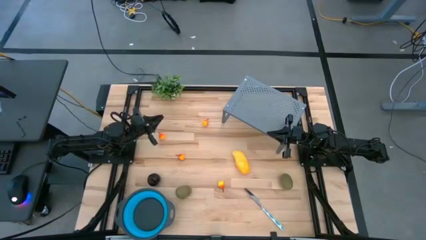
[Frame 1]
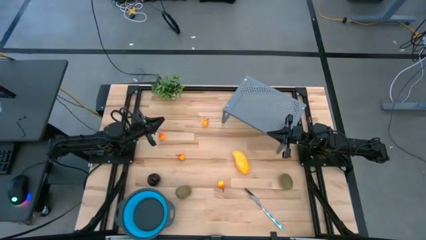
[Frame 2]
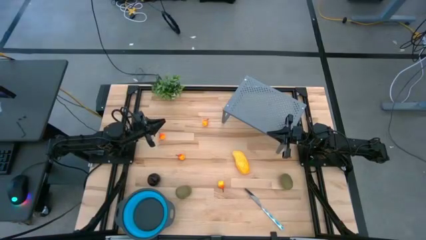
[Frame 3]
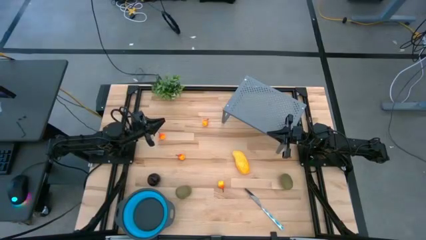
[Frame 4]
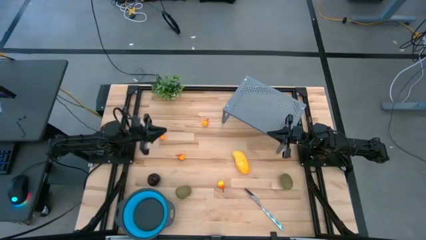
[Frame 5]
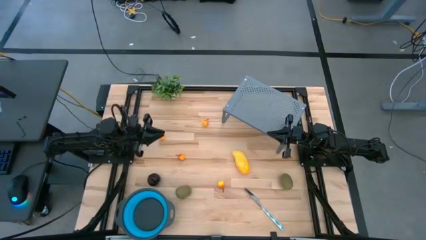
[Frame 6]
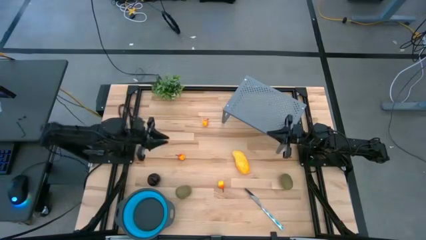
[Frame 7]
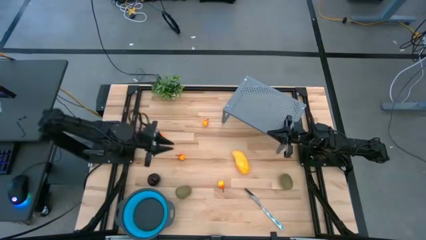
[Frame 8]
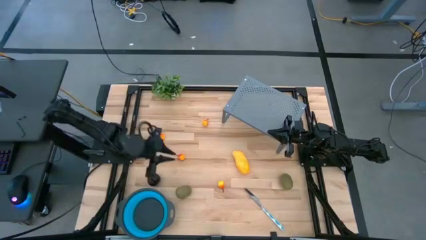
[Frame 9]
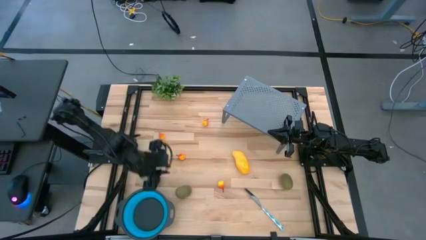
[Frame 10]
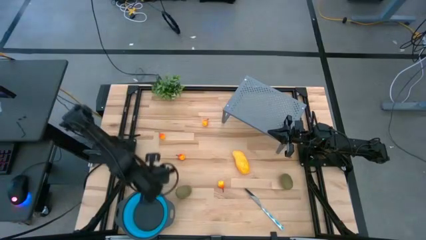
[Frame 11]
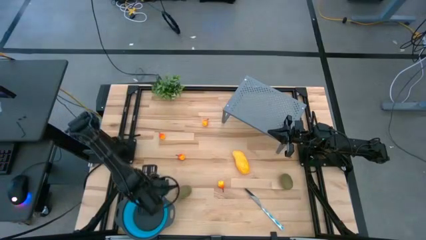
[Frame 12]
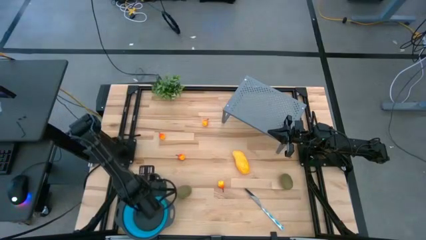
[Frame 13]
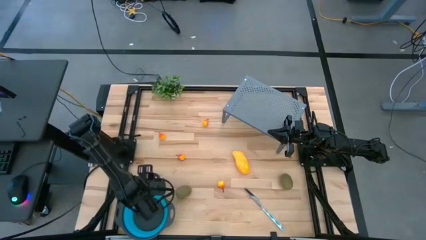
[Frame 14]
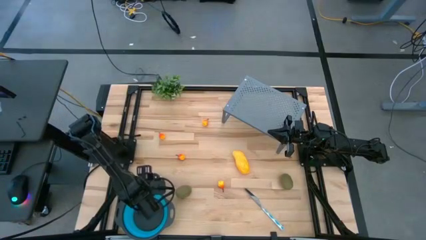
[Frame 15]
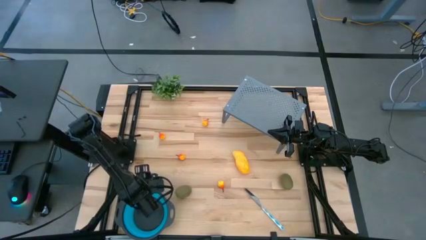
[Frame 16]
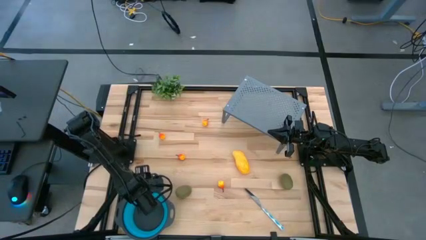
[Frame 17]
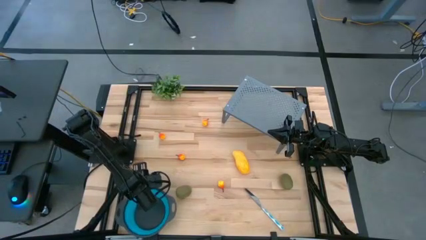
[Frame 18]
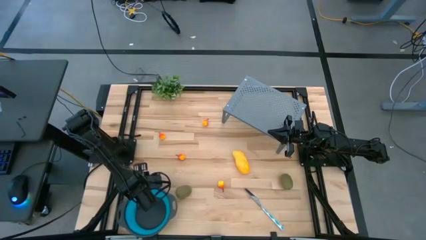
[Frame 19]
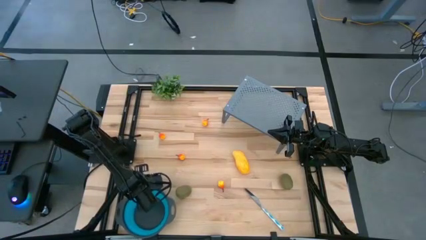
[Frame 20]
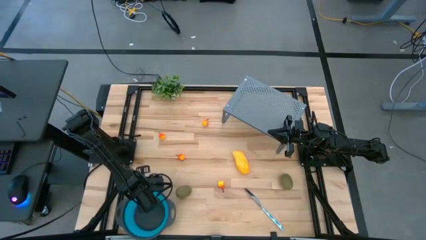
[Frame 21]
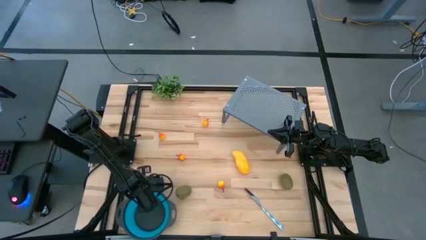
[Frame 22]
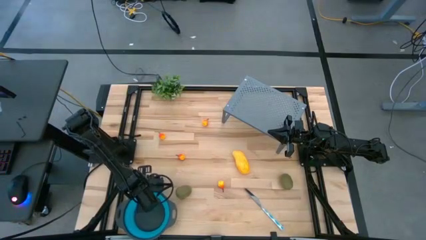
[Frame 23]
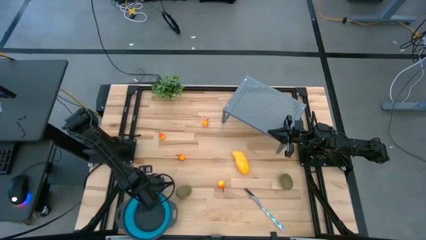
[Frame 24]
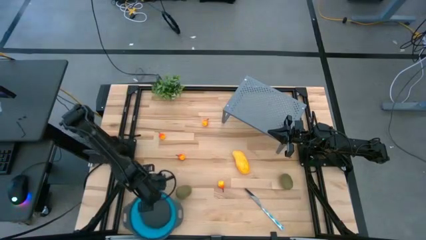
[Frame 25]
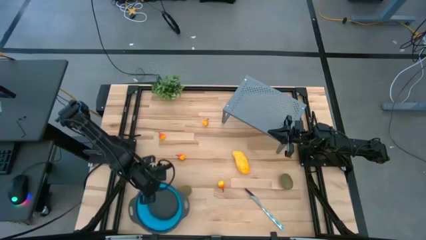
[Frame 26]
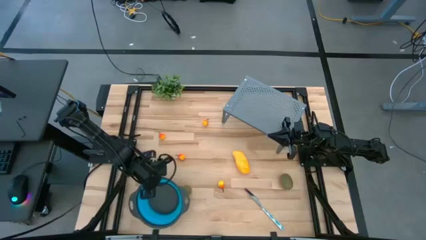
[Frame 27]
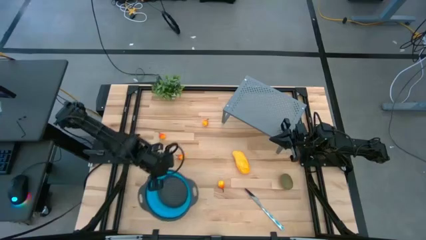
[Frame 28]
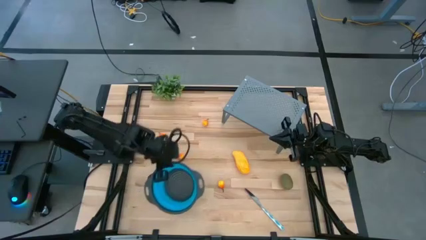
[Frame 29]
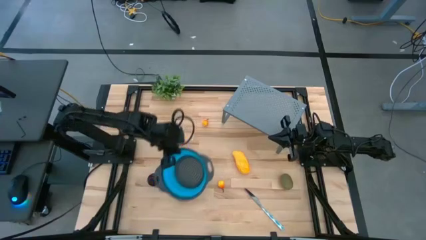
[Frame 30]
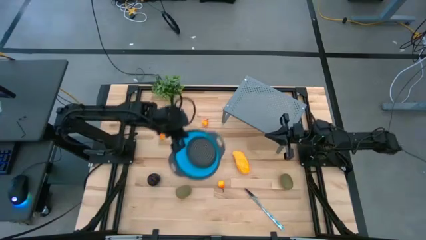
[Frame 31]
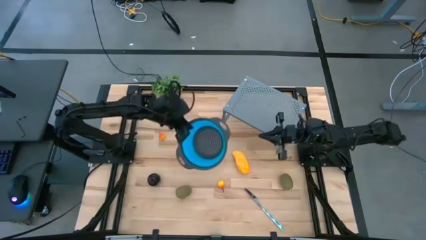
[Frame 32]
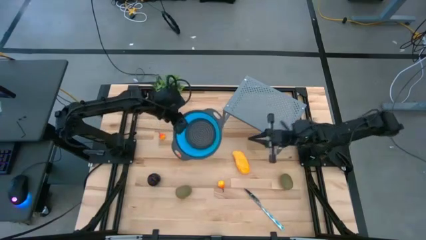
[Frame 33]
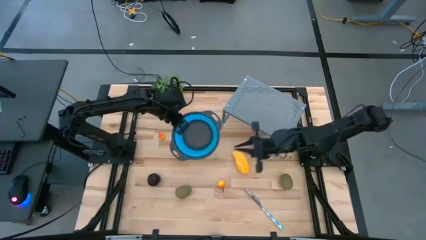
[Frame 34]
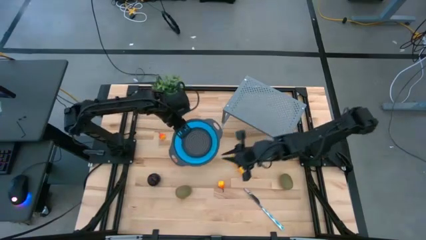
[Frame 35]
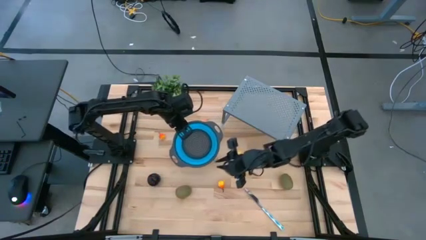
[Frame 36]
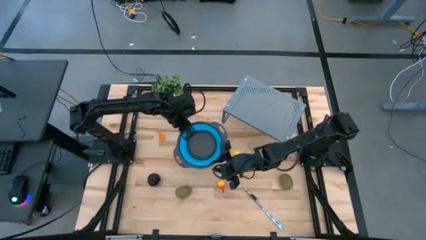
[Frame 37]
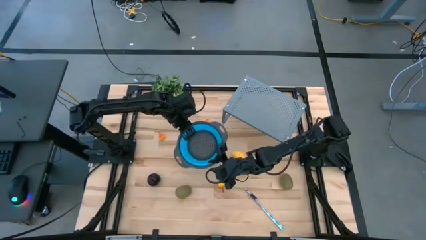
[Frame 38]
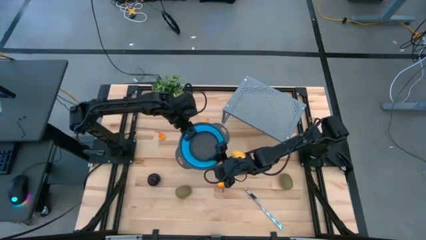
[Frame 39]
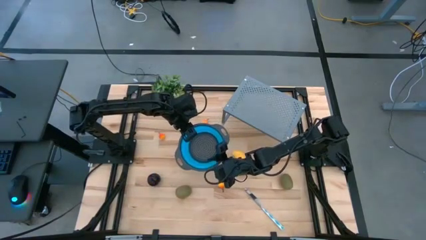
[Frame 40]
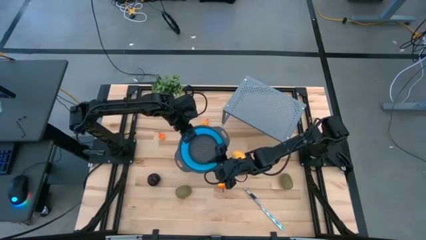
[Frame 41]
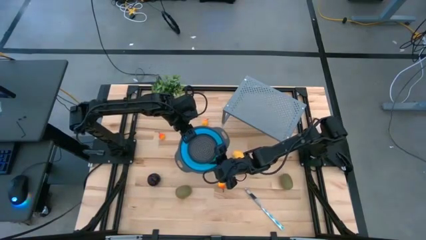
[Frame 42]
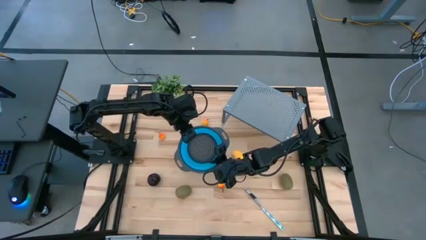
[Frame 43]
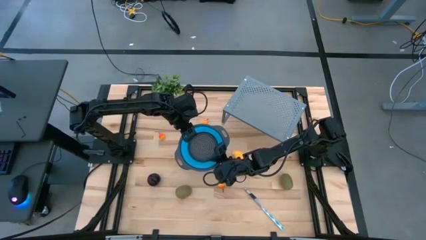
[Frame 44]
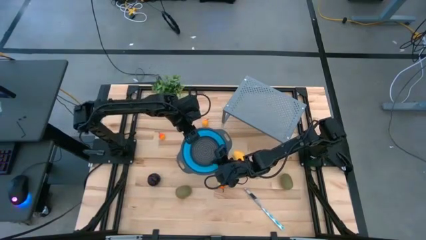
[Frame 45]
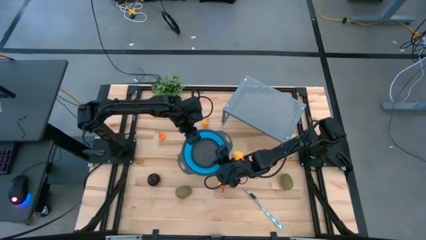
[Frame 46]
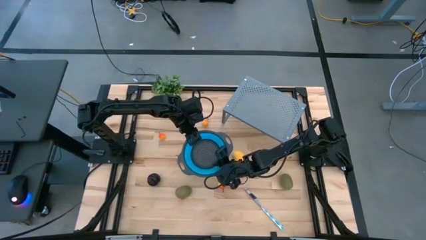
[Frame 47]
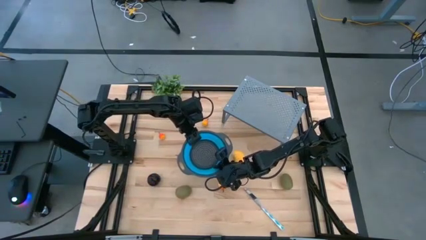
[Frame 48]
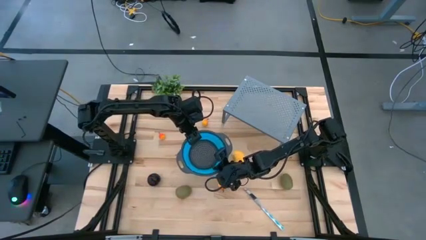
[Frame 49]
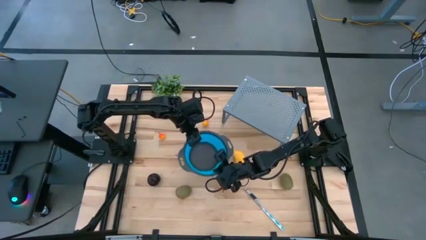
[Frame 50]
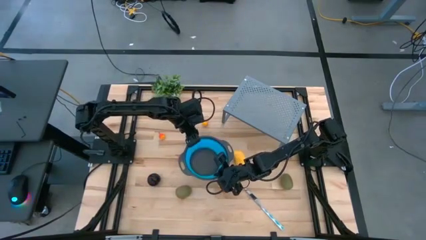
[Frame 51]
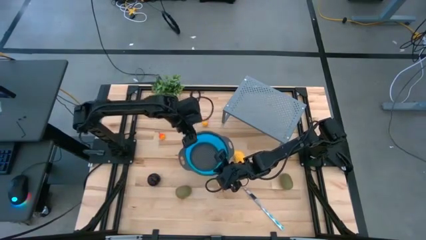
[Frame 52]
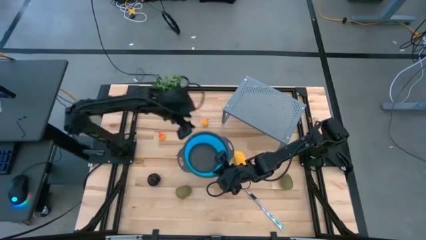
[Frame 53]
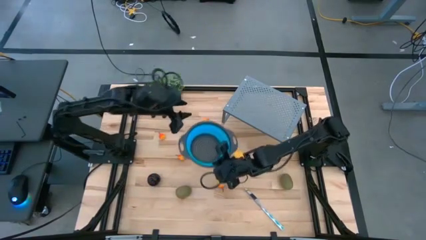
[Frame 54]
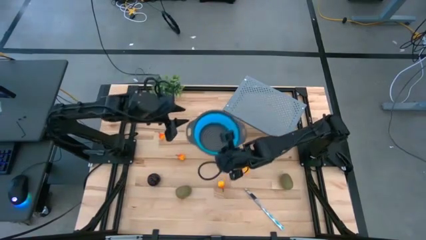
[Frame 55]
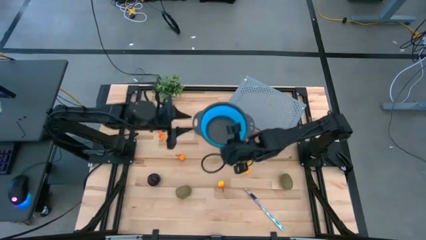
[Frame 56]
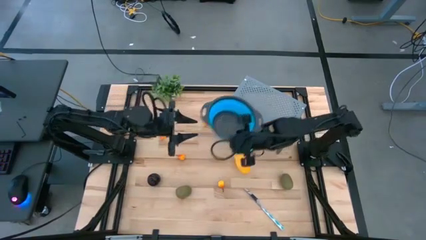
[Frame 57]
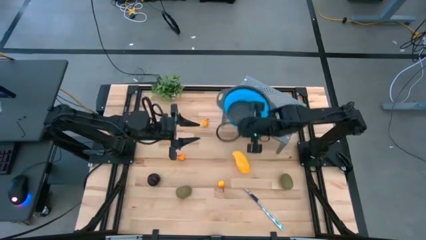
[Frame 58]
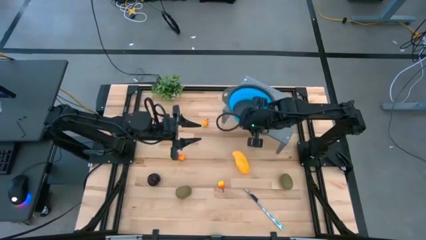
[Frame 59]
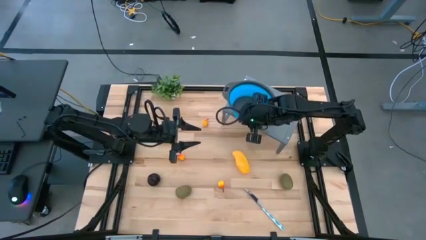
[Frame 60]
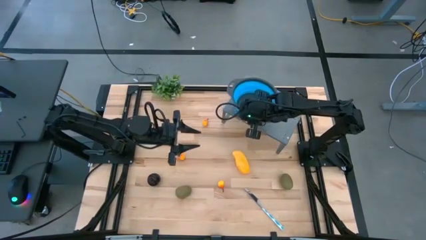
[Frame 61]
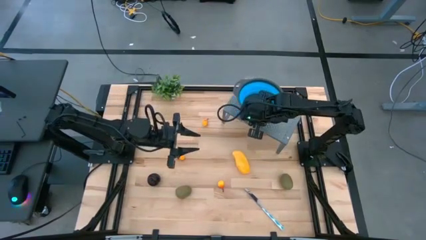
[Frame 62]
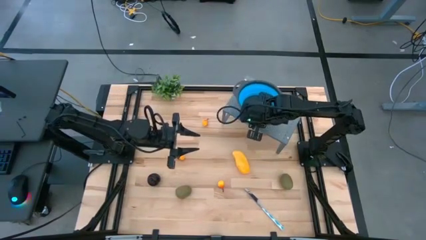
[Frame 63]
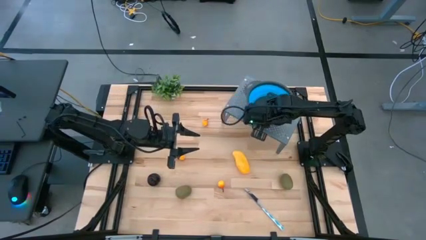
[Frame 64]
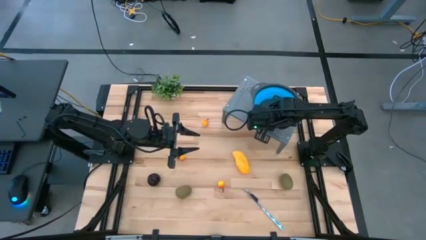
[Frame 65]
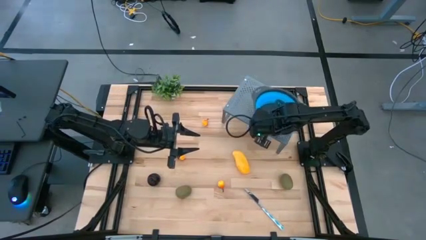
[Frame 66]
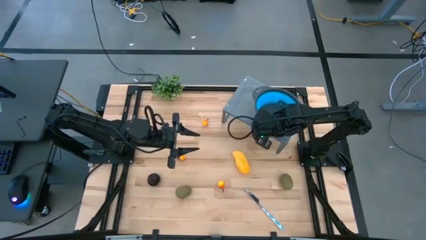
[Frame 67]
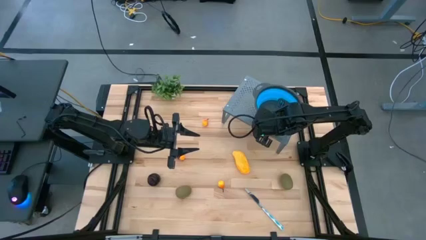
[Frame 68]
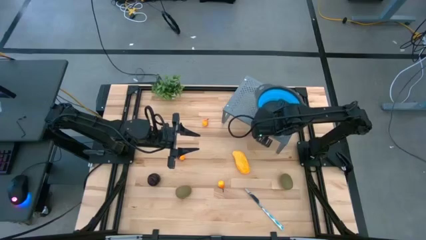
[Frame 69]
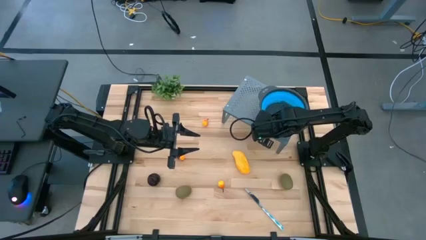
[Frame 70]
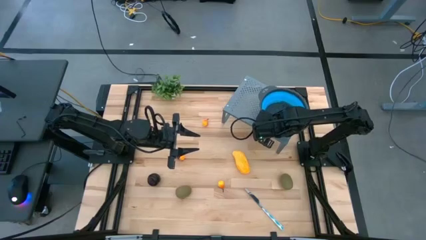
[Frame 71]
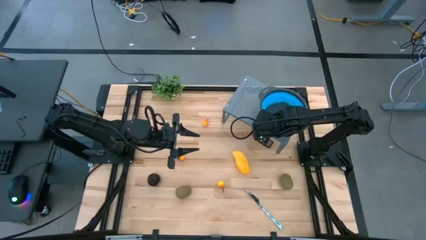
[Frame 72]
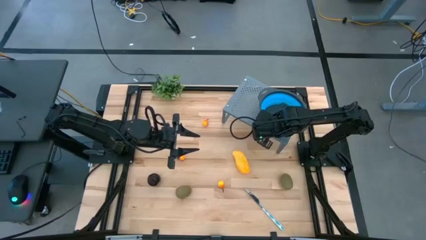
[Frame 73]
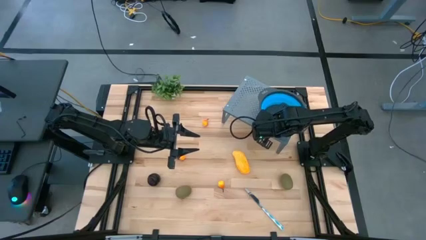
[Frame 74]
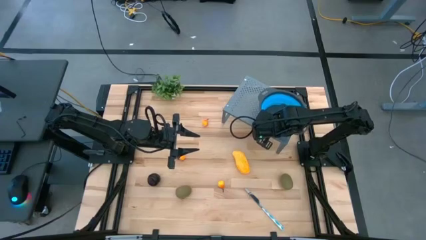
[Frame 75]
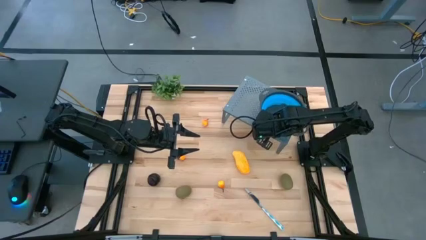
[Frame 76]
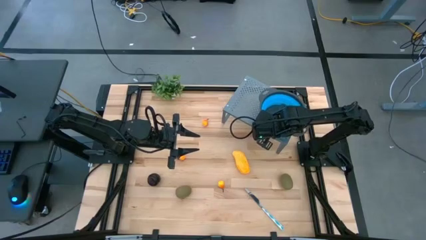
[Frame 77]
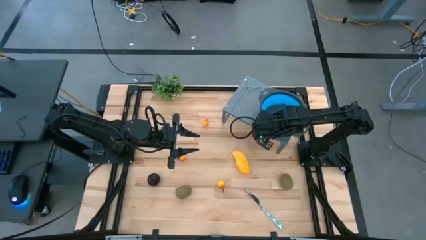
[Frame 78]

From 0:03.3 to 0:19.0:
Task: Pick & Place Fruit
Put the strainer bowl on the shelf
